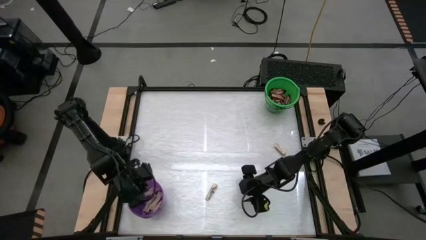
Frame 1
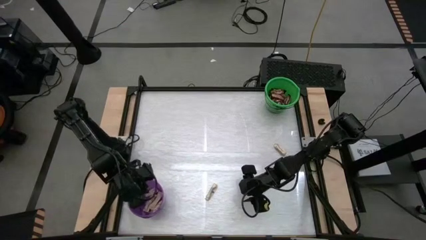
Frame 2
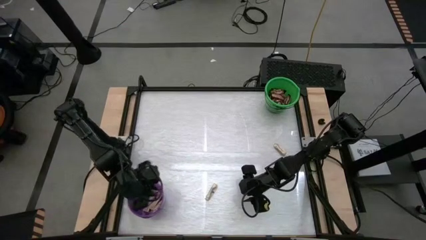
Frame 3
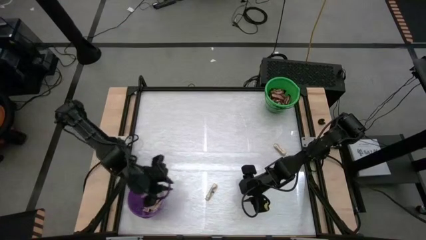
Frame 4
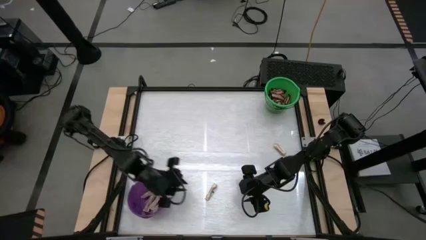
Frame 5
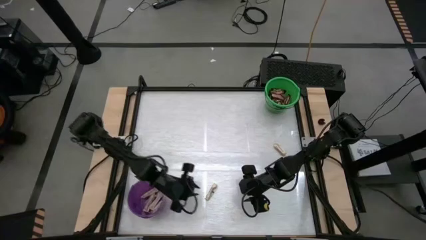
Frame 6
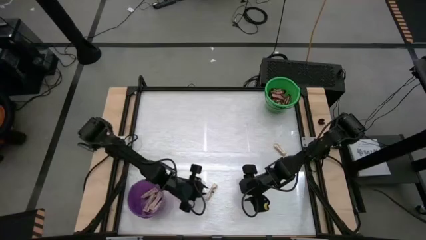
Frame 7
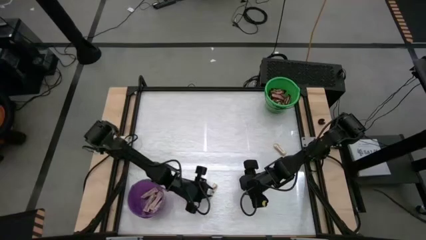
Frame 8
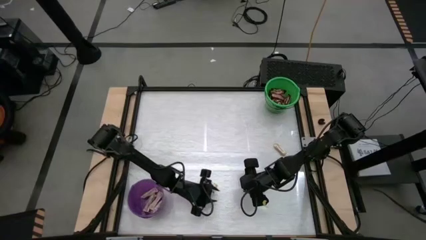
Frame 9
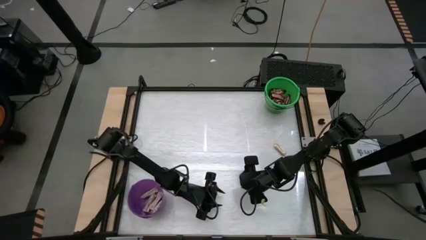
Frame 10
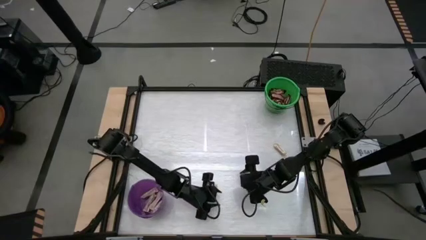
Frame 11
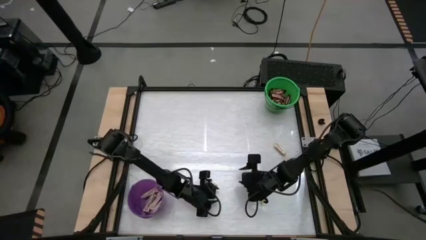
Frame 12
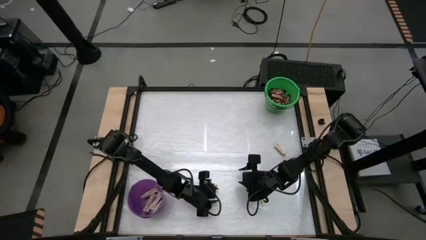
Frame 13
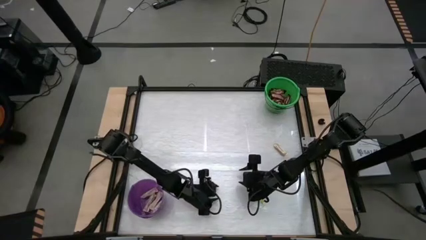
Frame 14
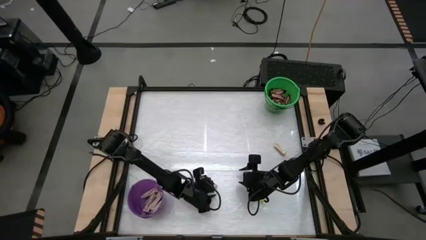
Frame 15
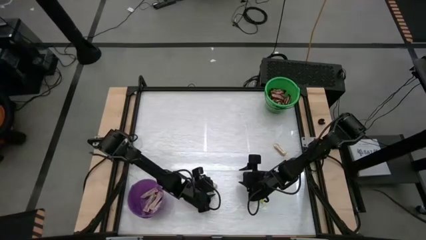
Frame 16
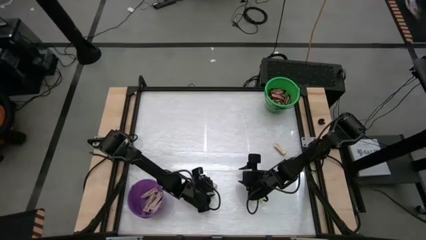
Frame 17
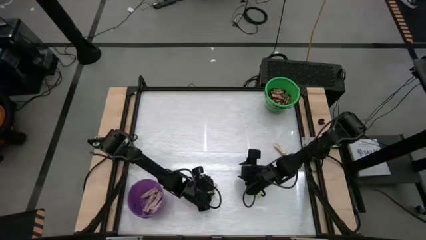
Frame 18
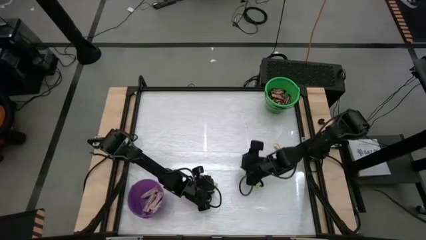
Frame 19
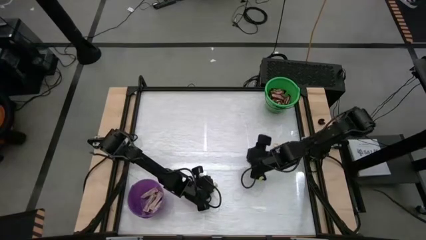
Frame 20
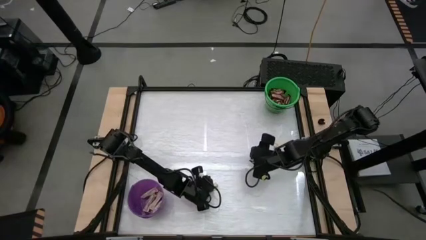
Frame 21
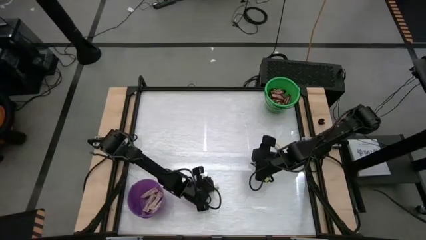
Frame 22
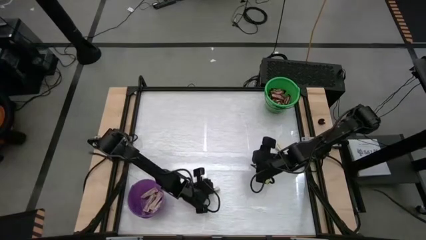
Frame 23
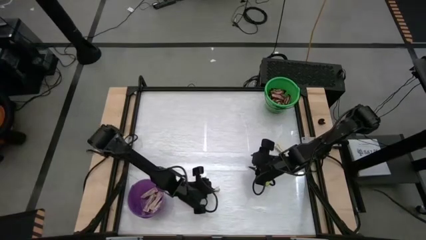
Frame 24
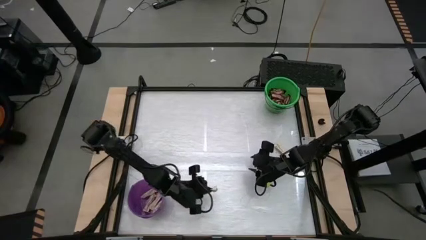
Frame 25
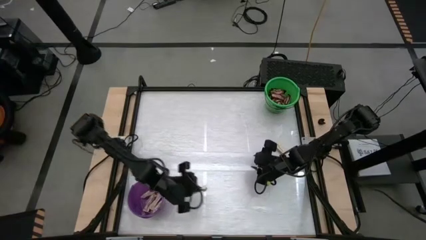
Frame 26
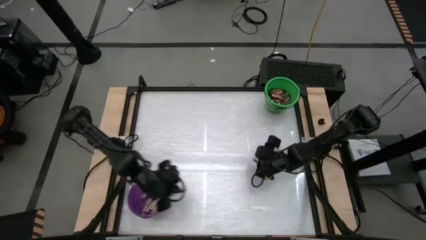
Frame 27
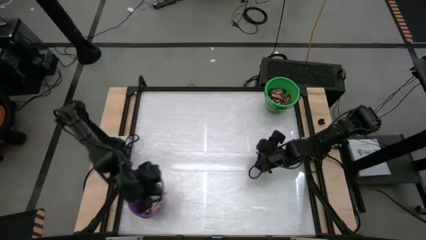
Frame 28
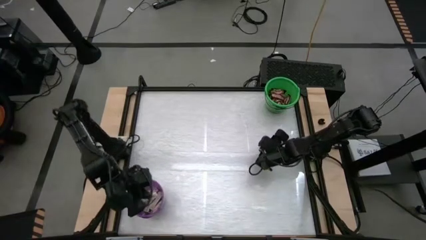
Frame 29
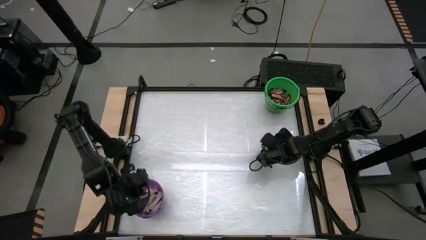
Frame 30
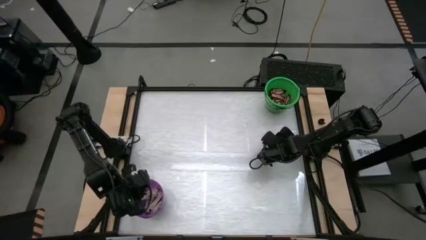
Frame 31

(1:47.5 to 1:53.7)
Task: Sort candy by brand, put in halloween buckets
Put the white candy bar into the purple bucket

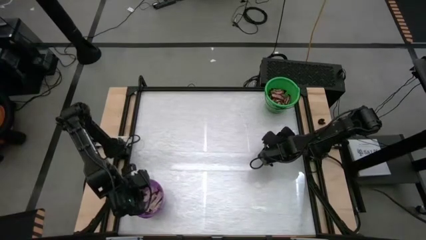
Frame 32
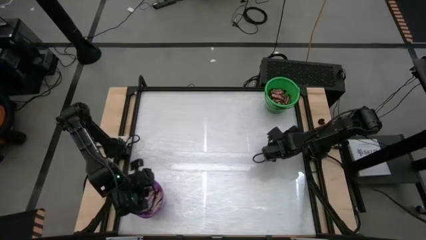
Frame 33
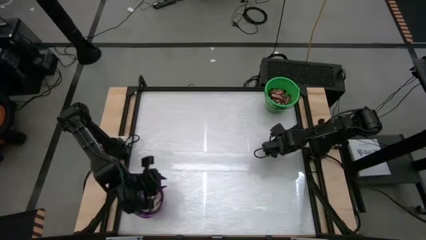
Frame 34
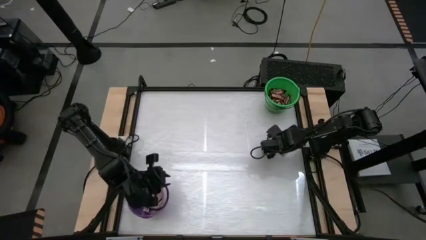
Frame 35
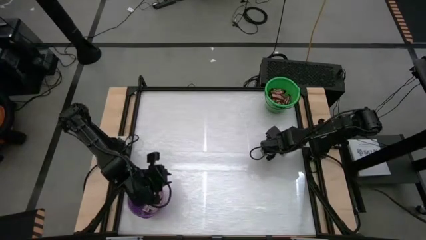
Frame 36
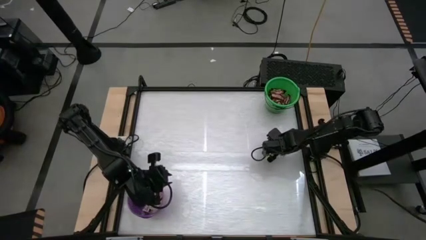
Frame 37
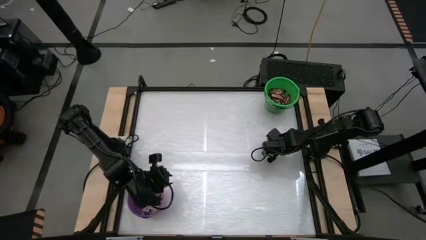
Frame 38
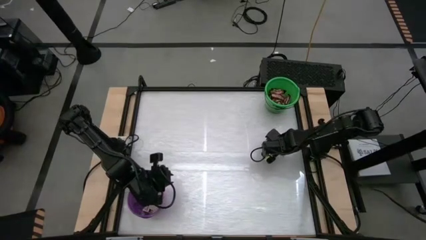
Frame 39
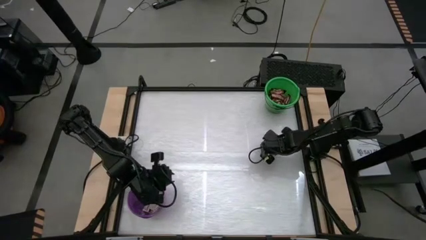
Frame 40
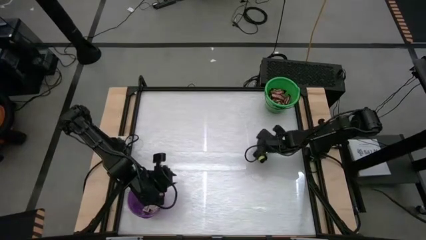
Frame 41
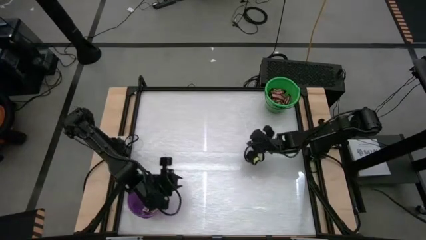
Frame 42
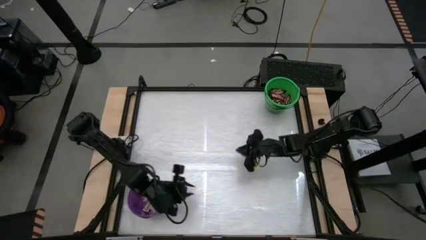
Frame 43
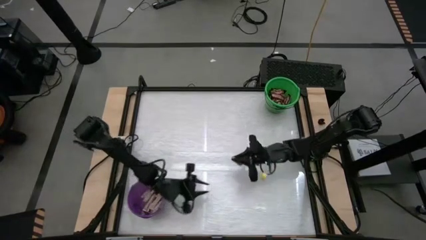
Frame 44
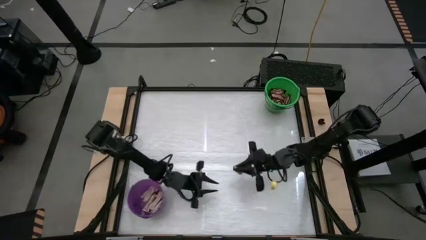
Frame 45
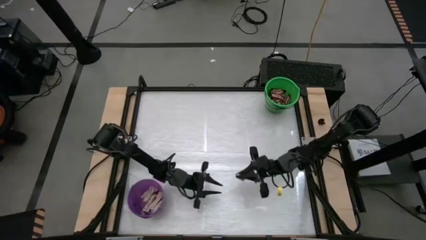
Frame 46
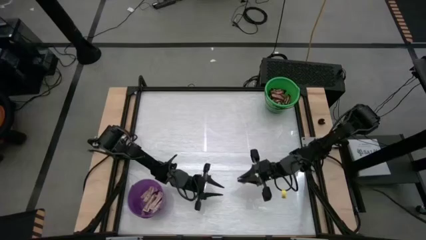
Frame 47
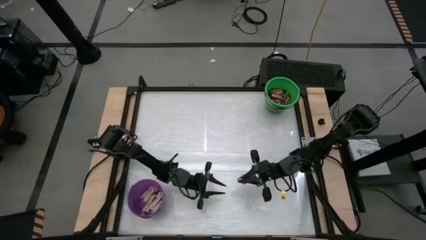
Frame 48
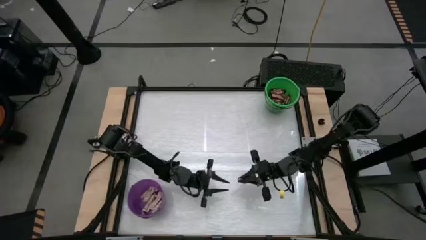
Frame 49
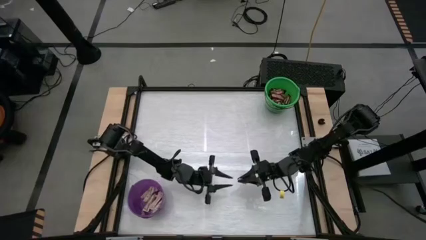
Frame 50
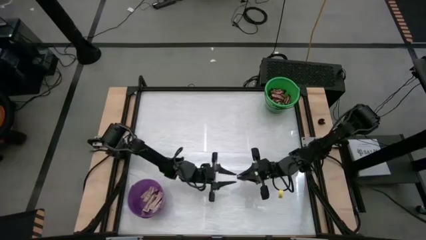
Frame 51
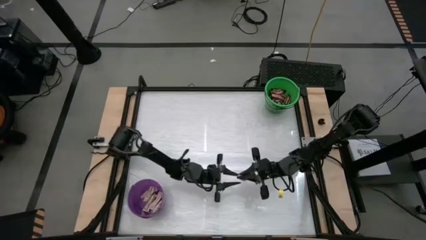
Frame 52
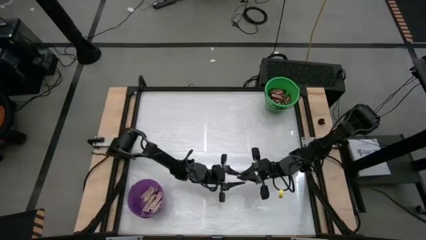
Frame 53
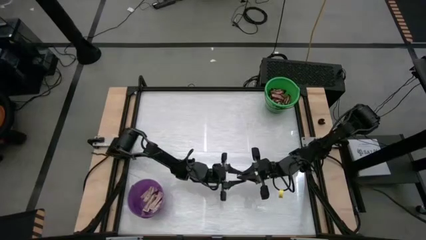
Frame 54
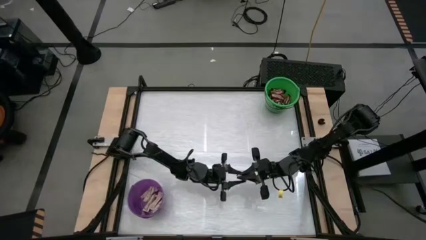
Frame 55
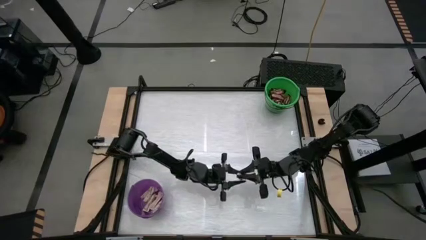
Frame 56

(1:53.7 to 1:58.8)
Put the white candy bar into the purple bucket

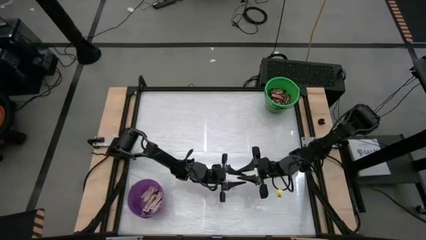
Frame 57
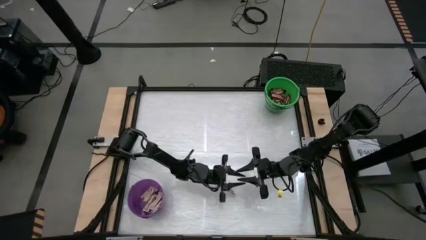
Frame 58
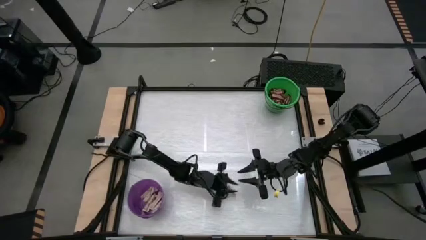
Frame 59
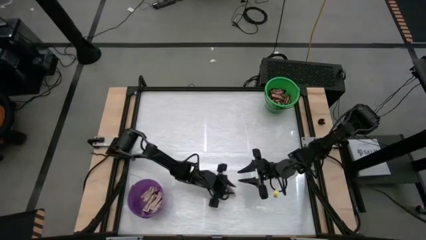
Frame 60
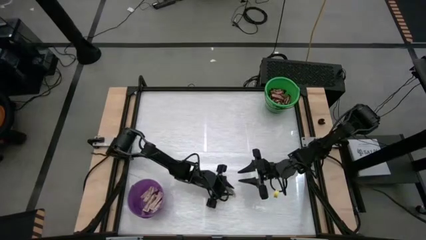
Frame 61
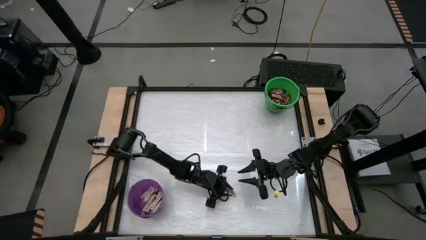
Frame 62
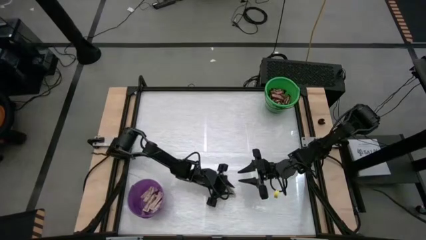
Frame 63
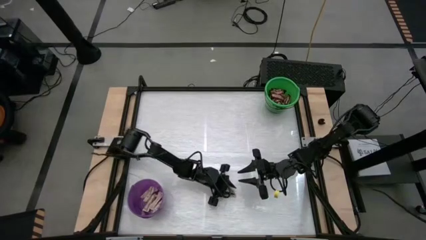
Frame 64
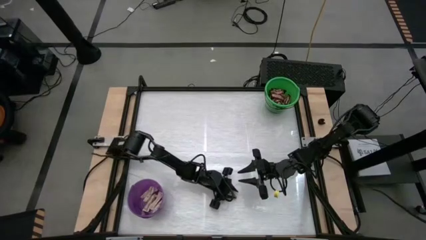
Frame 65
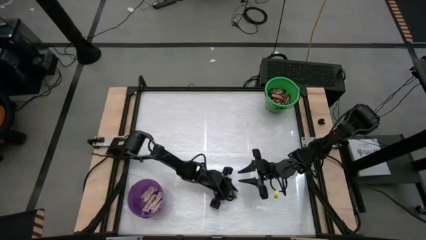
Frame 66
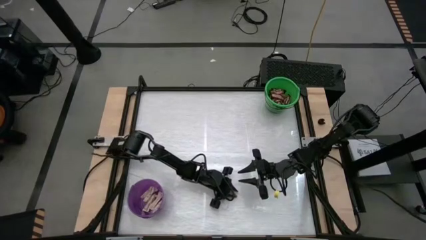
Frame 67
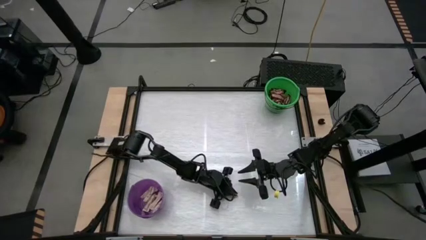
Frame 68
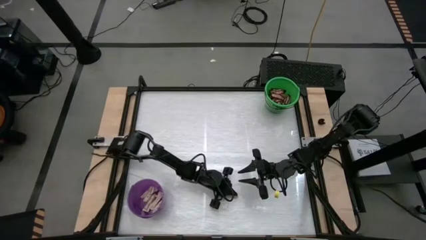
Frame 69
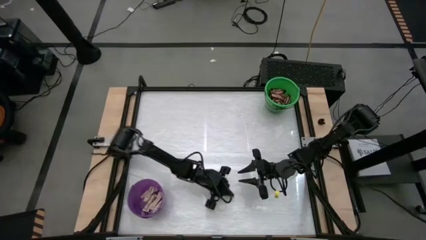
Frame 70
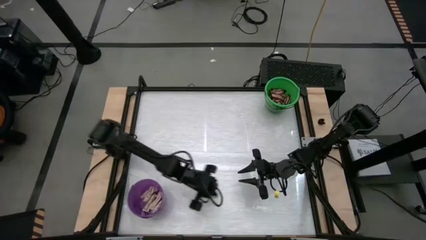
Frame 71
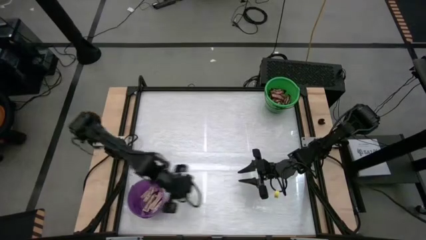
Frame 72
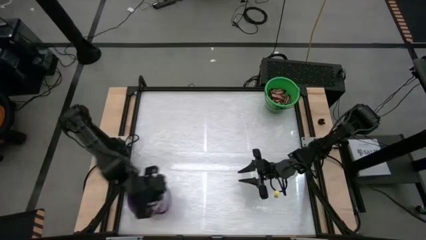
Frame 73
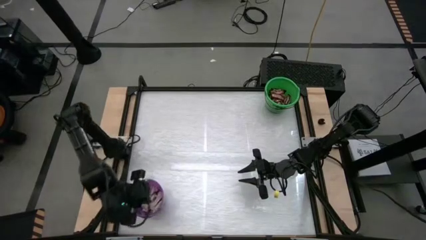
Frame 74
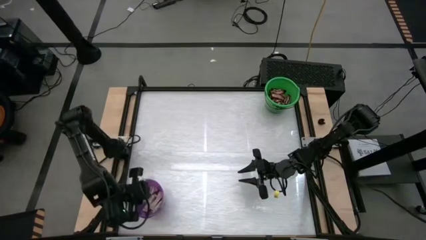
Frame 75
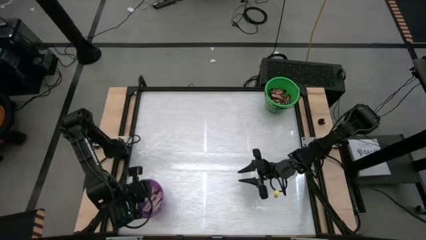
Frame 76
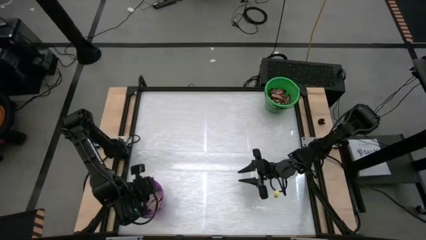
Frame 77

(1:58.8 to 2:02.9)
Put the white candy bar into the purple bucket
